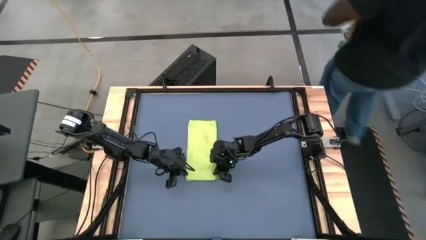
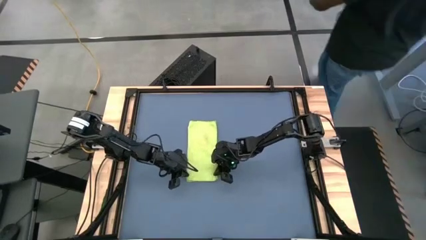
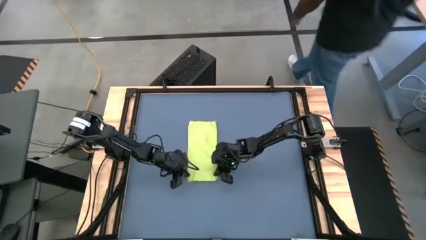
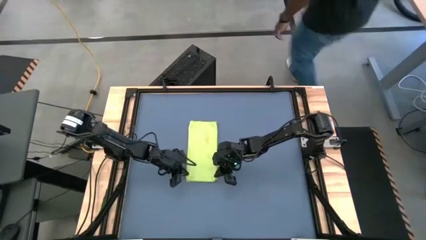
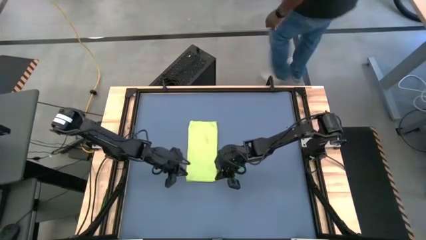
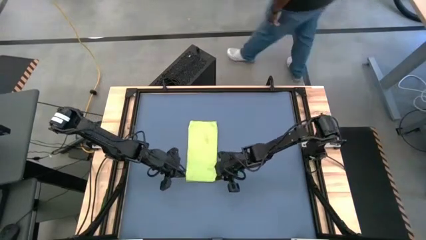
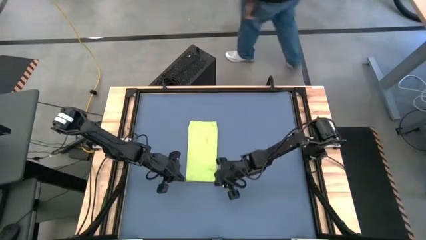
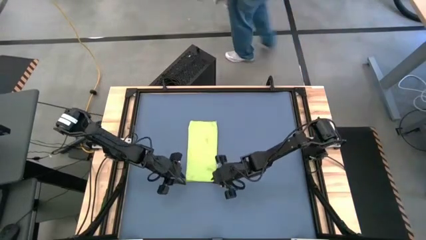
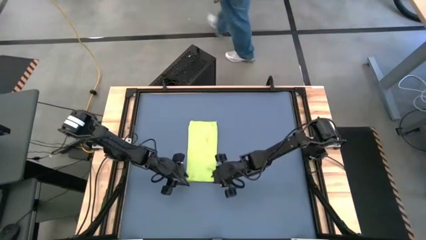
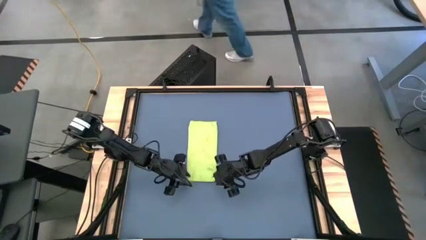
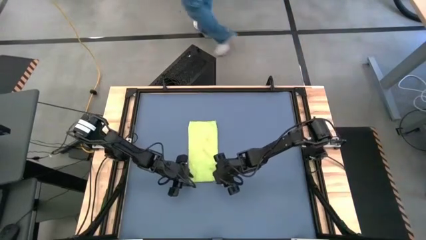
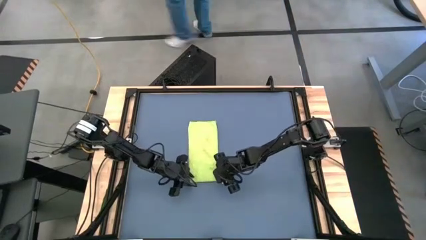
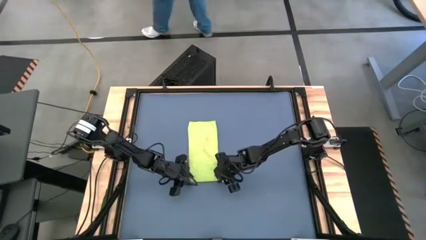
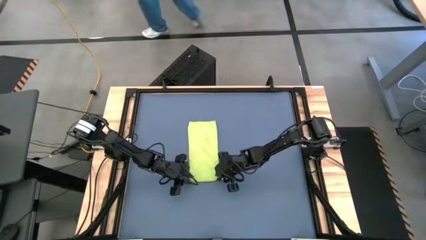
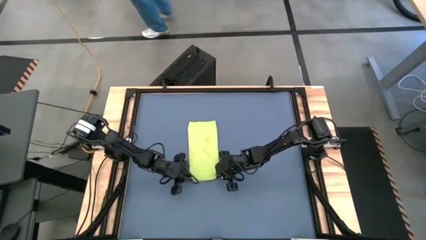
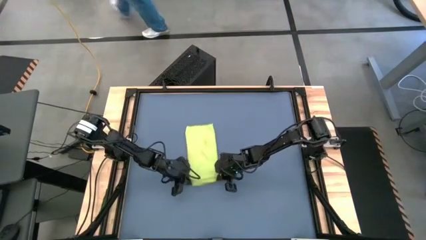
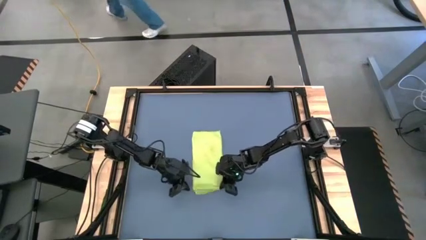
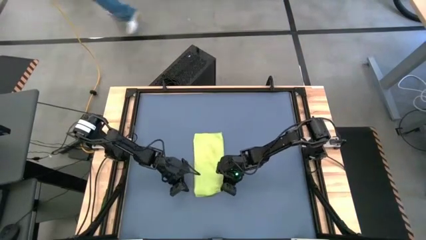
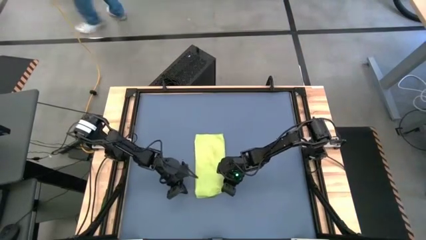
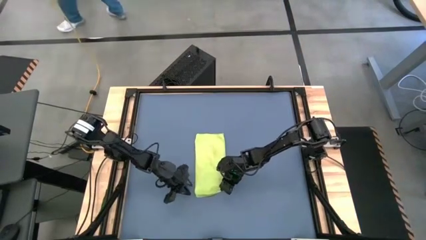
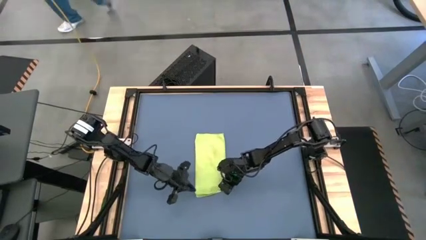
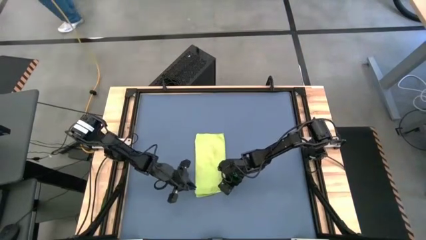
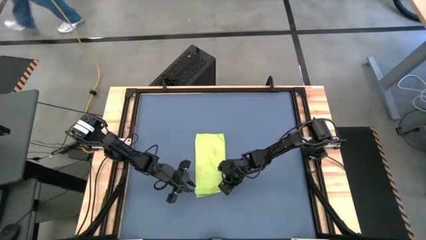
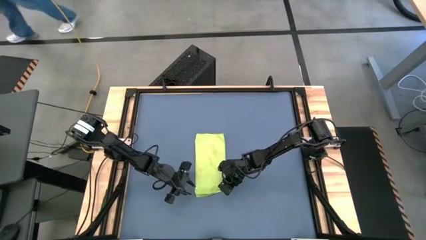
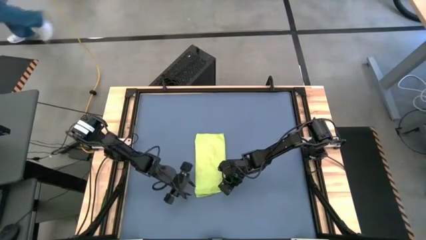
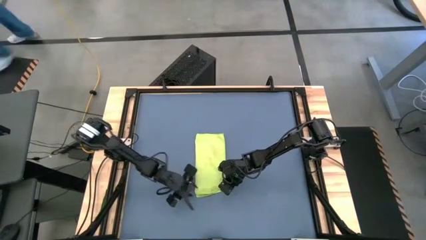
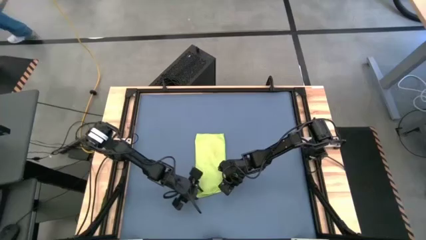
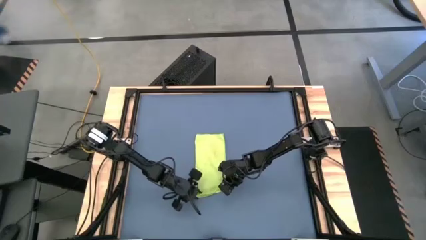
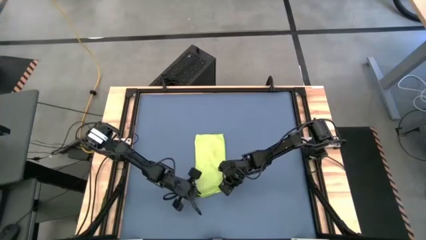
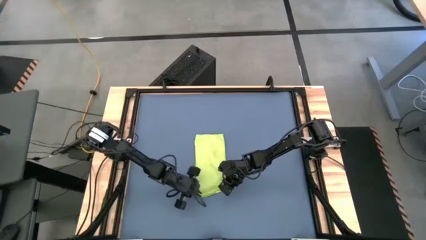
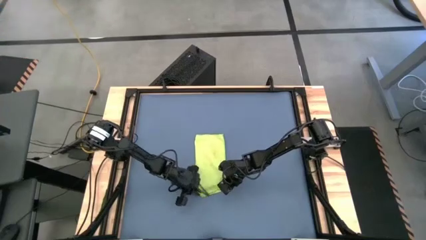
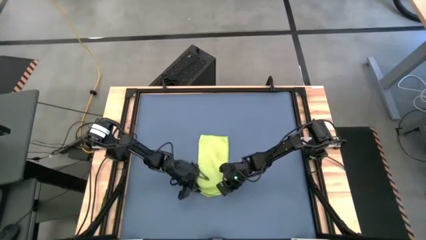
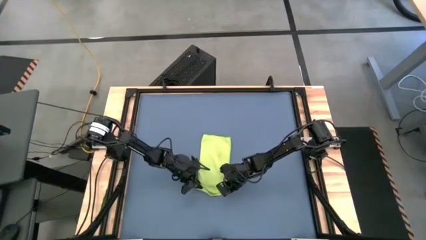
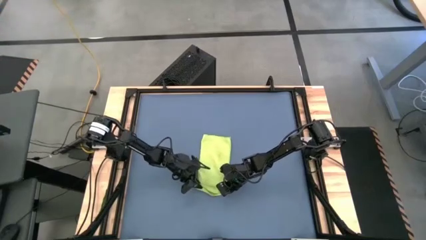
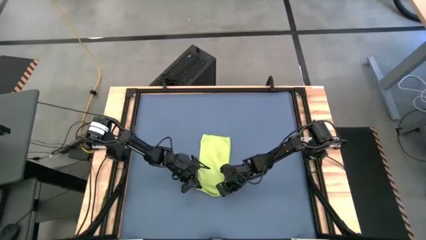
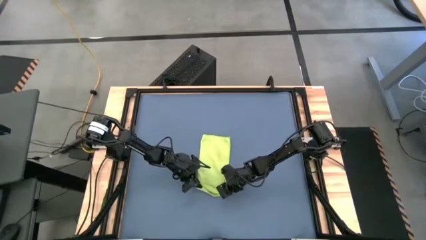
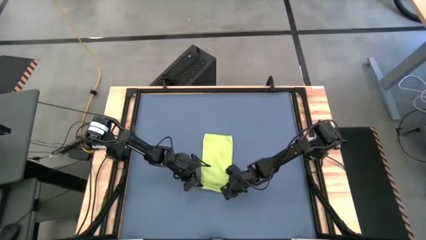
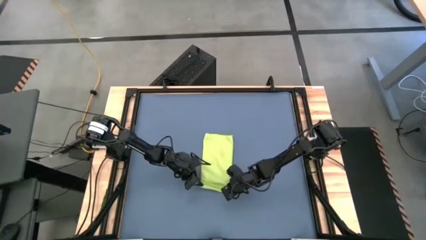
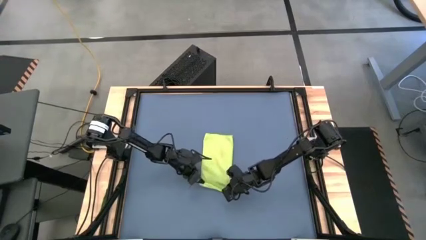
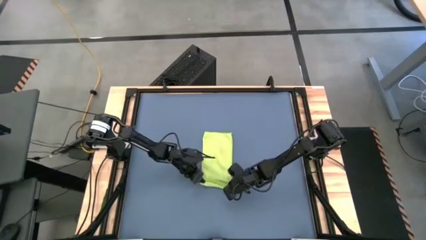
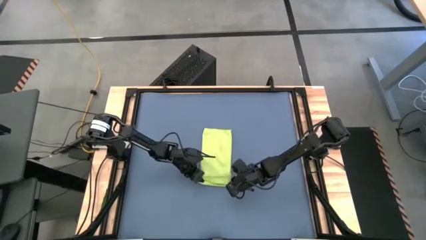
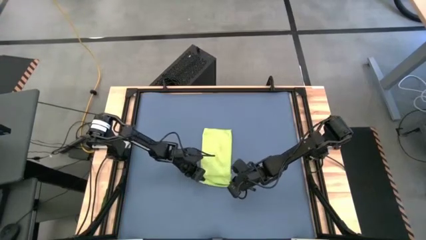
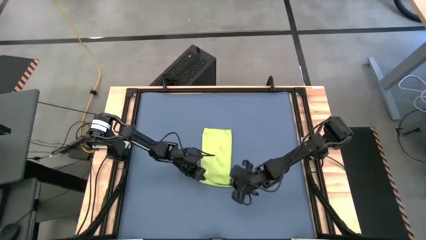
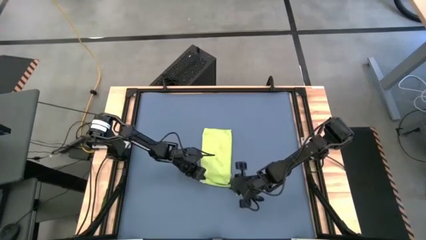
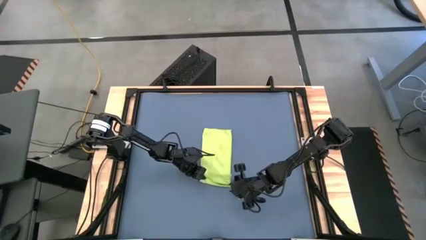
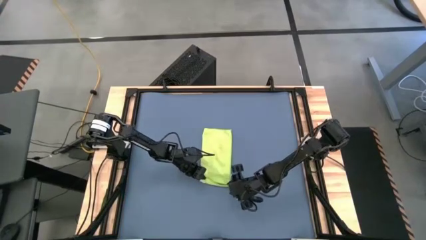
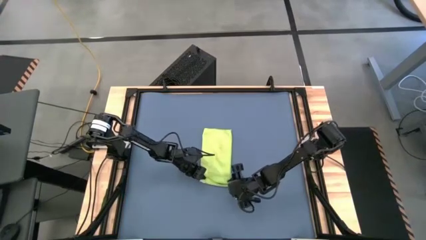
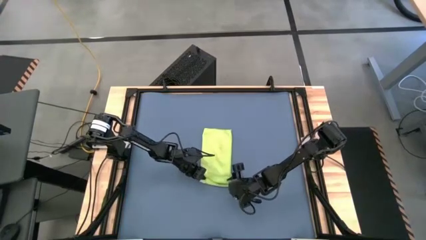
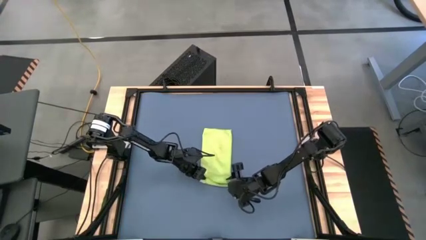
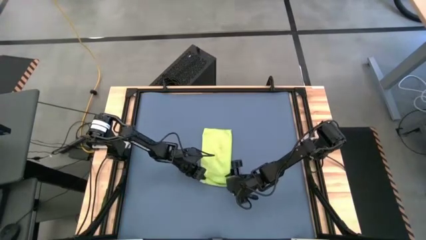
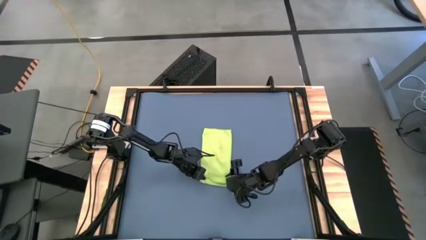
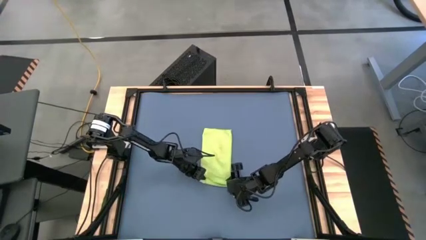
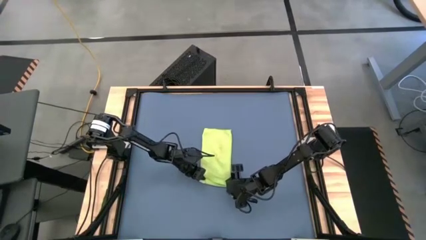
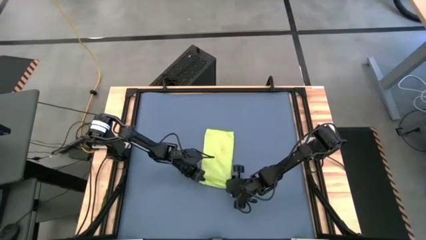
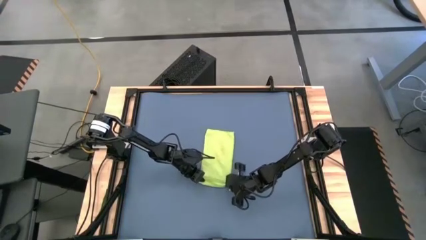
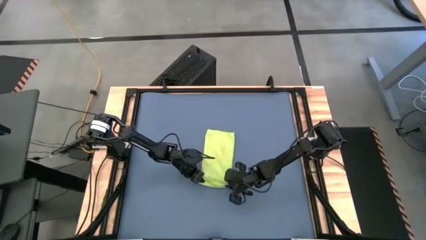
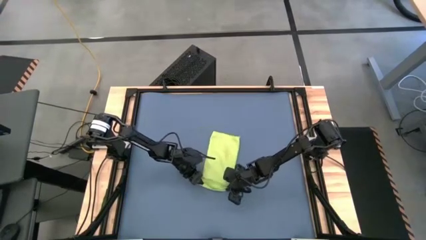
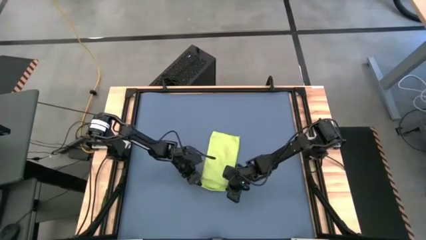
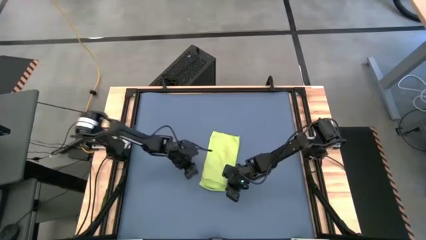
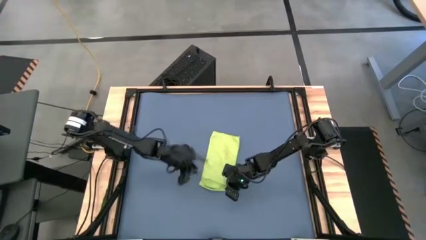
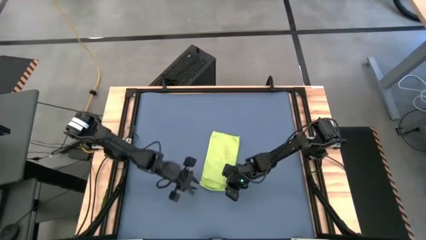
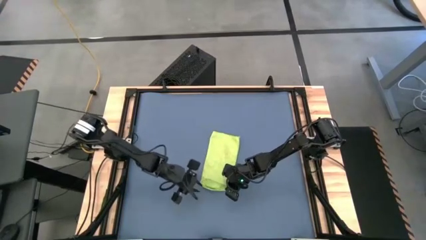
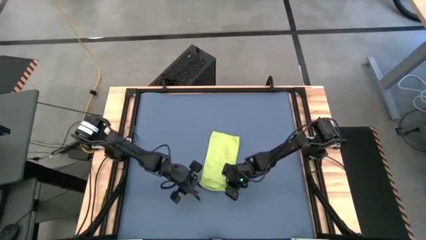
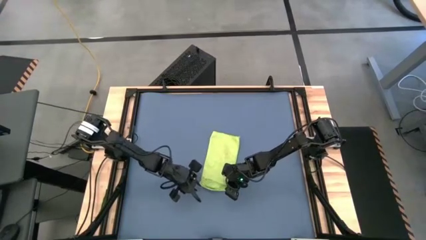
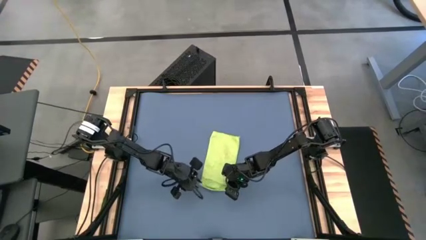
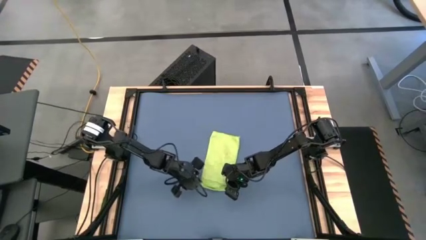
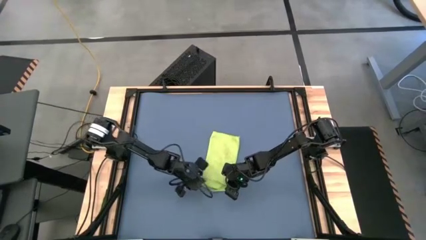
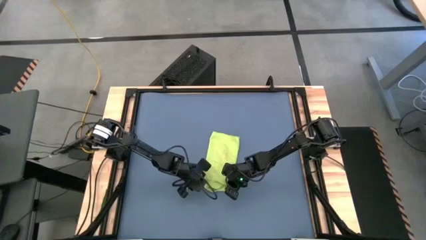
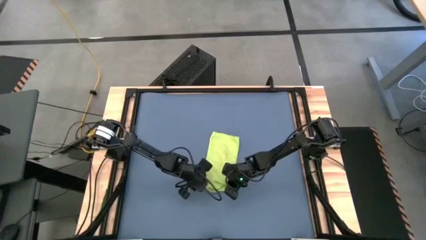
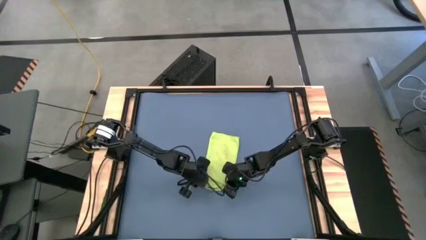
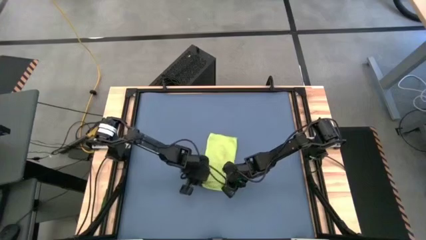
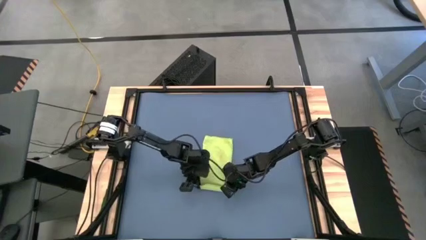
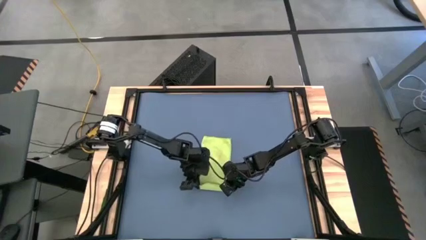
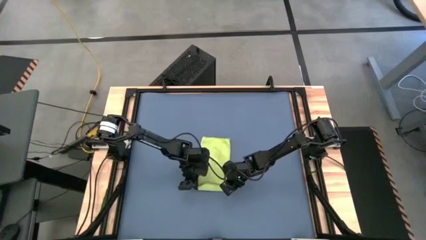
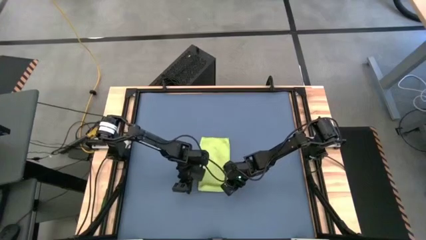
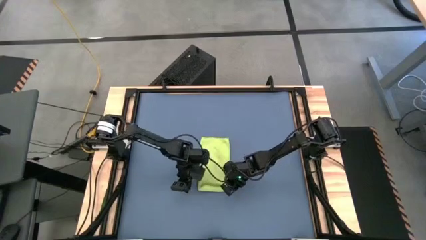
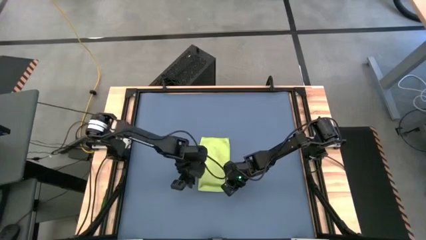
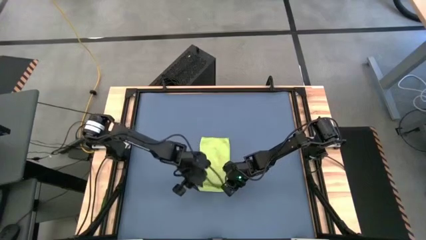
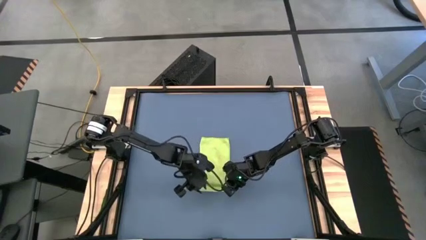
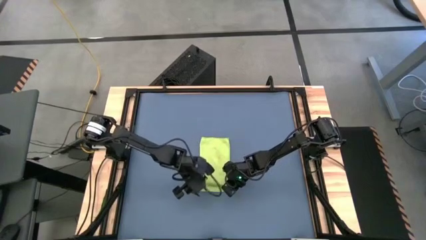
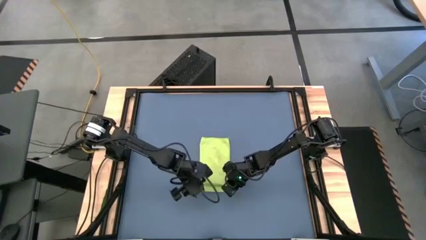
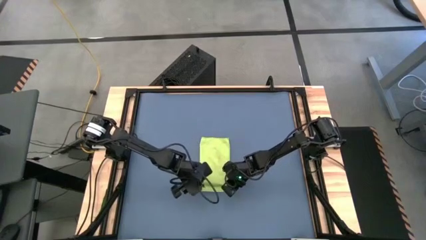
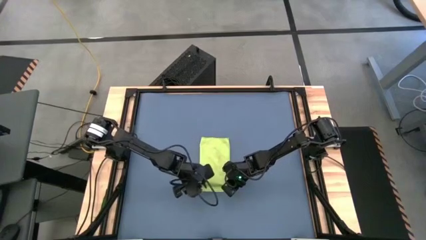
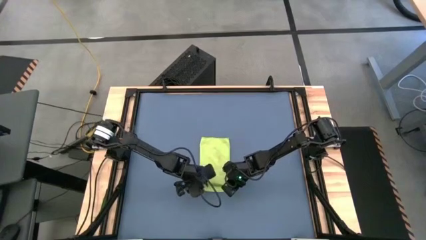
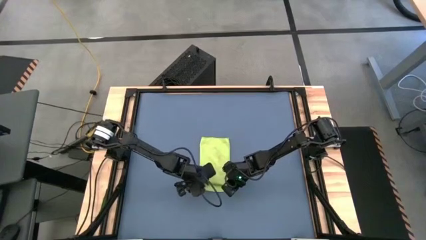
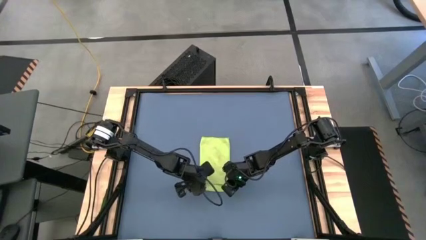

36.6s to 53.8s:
Task: Roll towel
Roll the green microfiber towel
